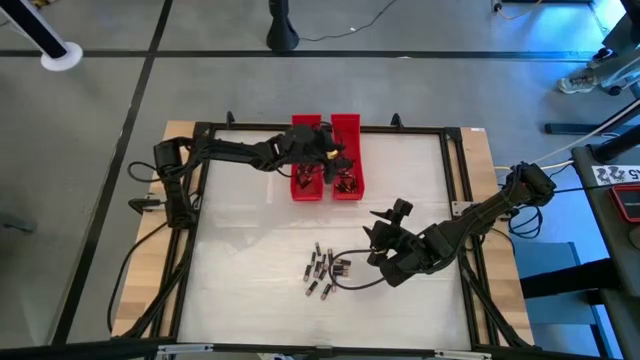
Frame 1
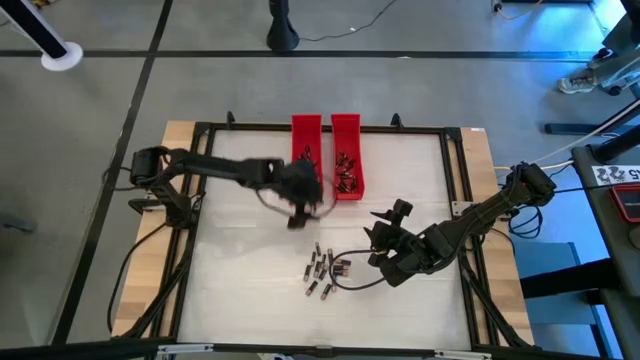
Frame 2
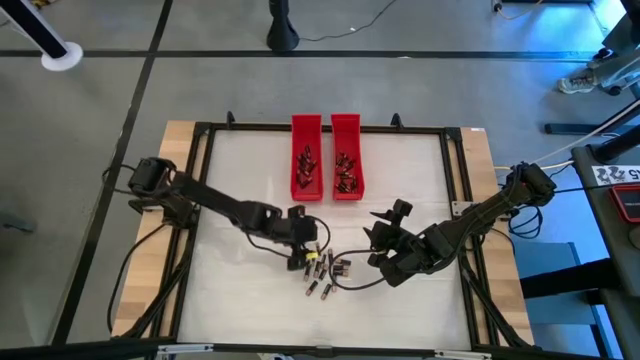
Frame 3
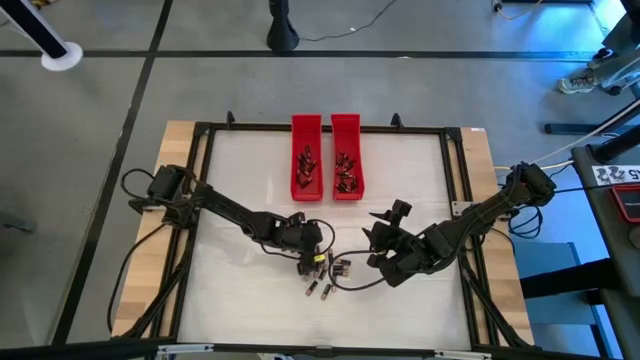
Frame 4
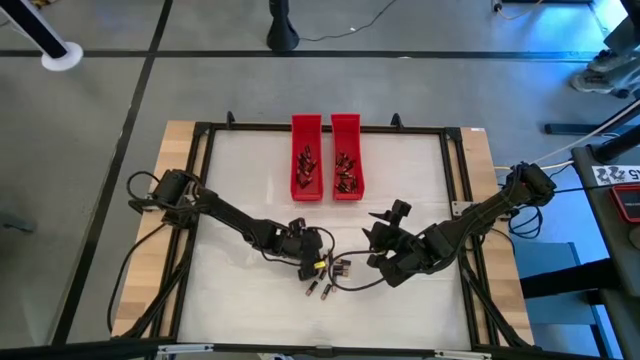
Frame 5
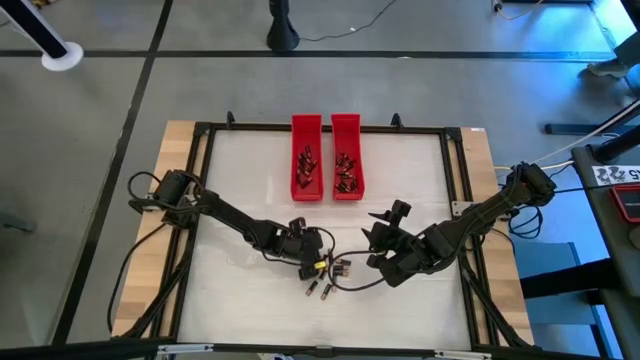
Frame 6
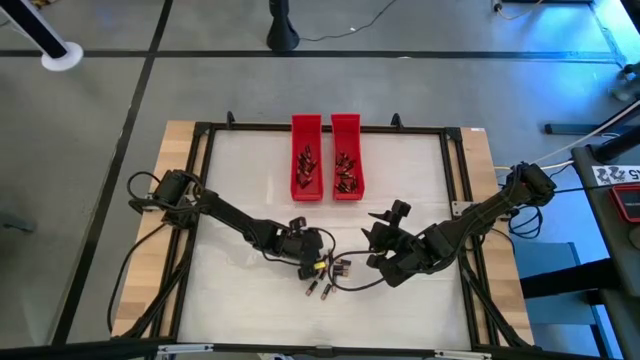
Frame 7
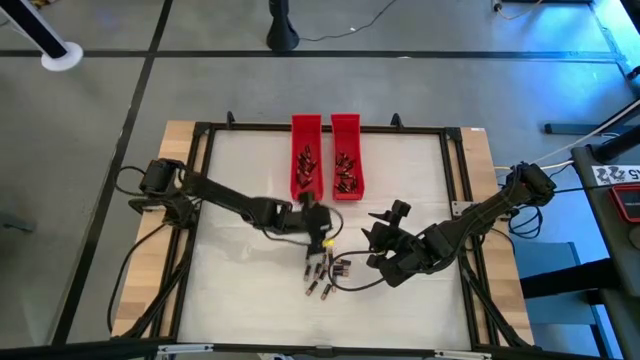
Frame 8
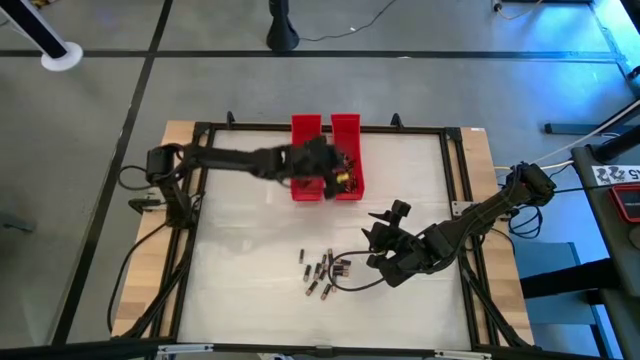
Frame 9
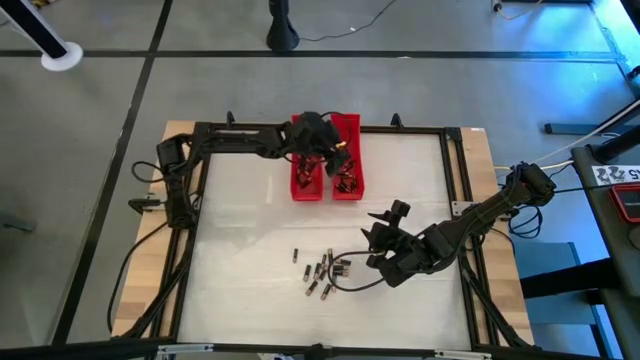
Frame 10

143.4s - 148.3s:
Task: Sort batteries
Put the small black battery into the right red bin

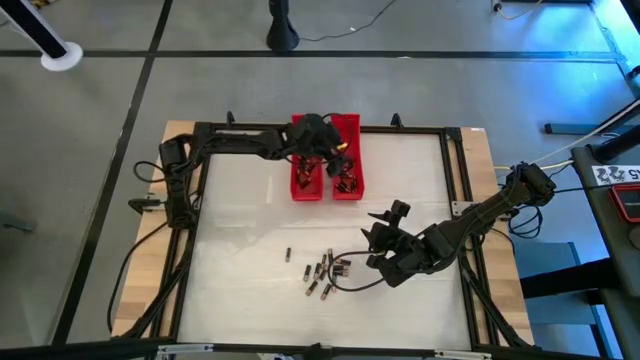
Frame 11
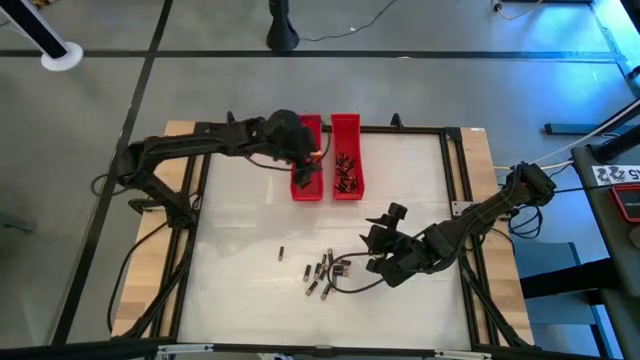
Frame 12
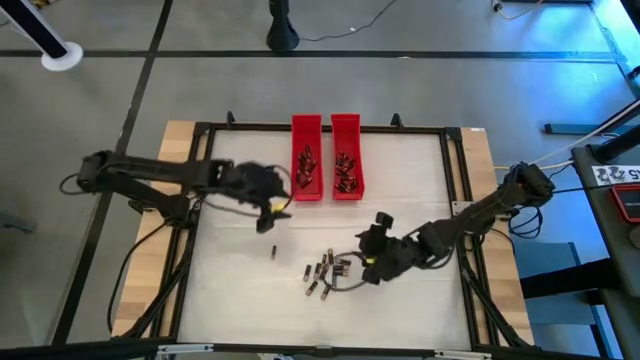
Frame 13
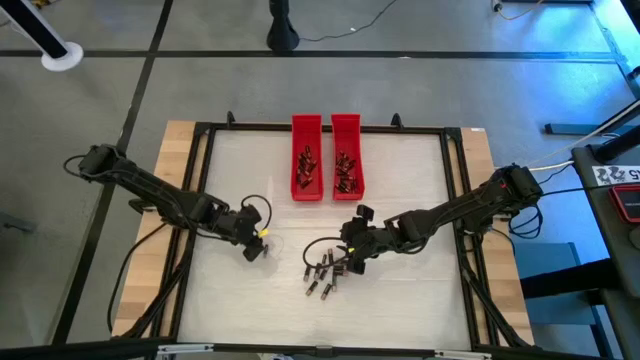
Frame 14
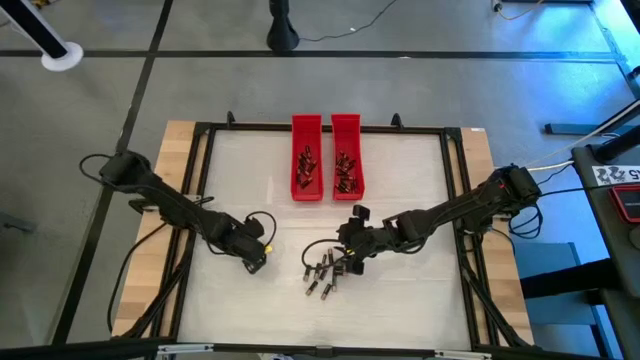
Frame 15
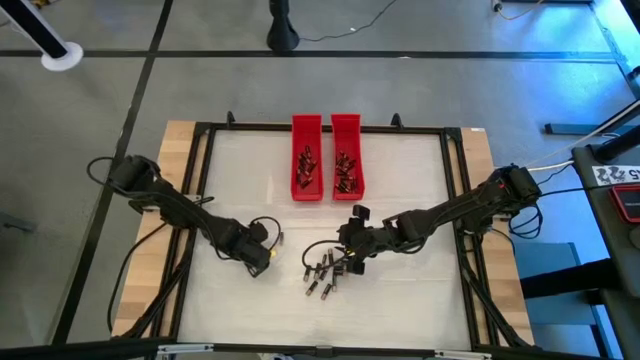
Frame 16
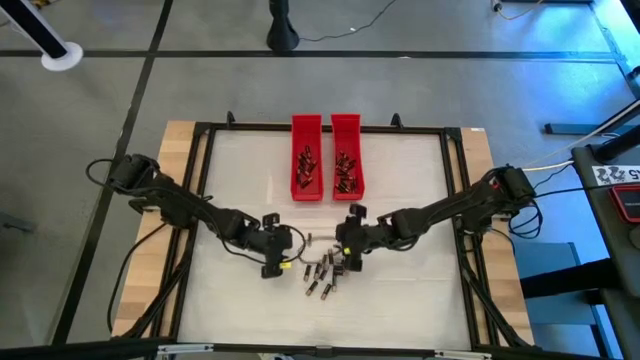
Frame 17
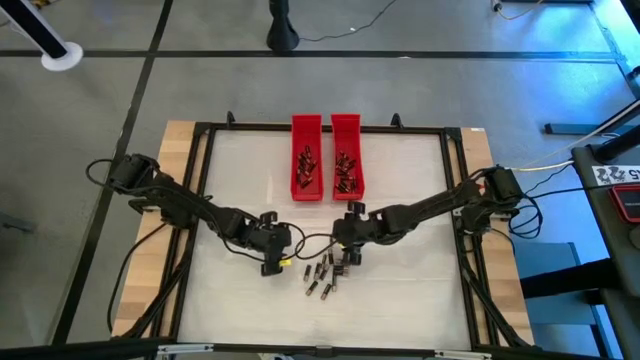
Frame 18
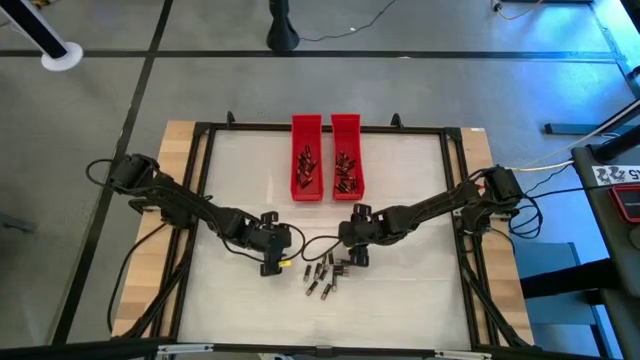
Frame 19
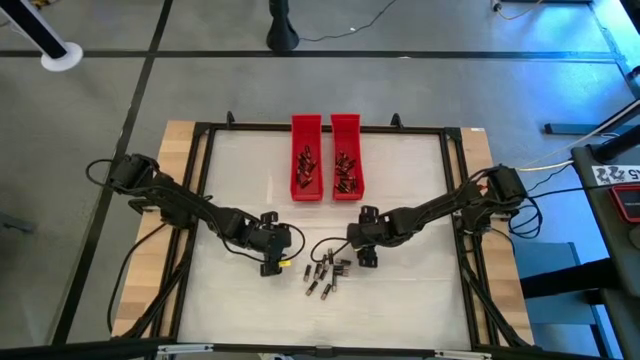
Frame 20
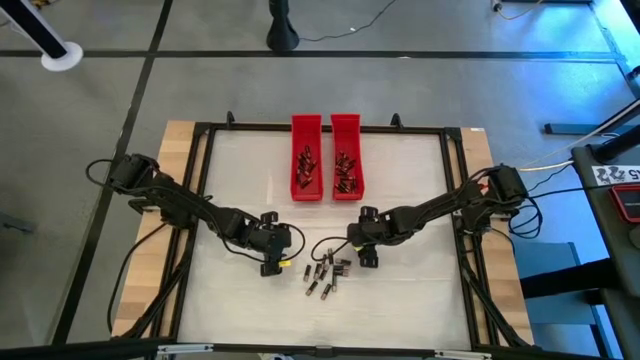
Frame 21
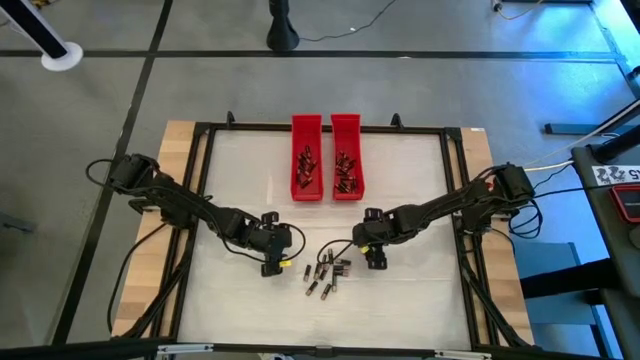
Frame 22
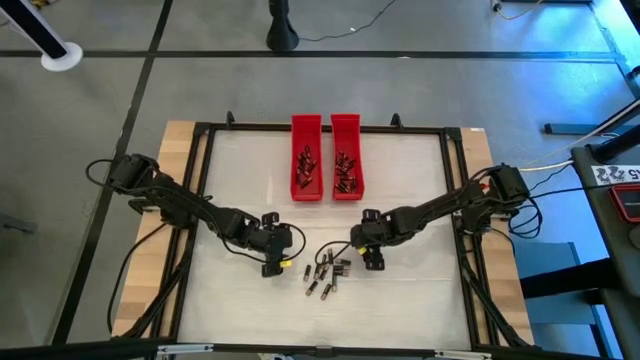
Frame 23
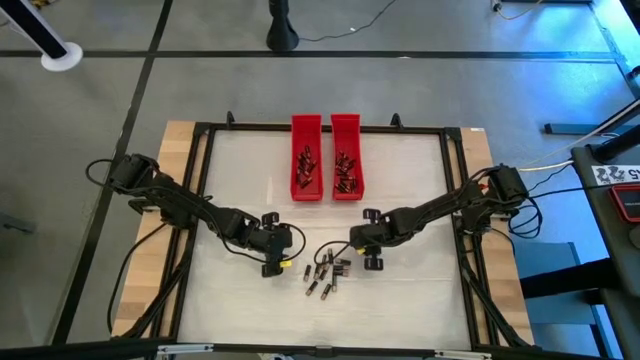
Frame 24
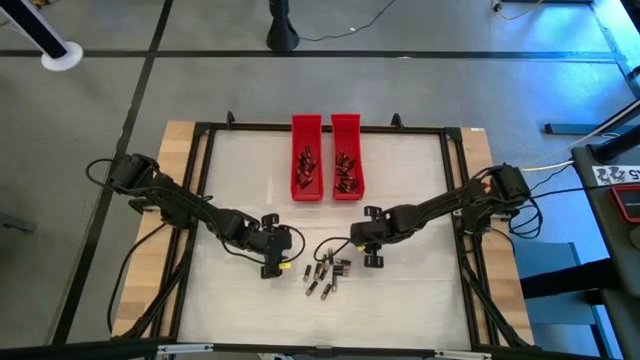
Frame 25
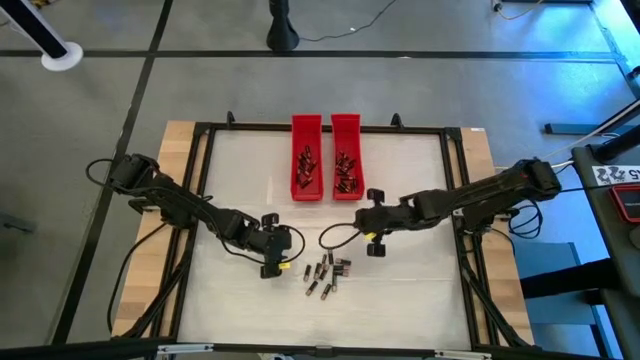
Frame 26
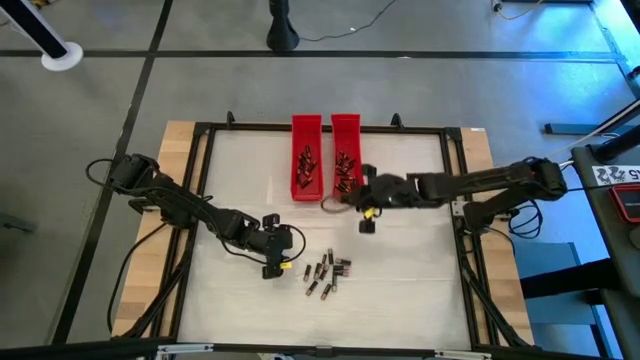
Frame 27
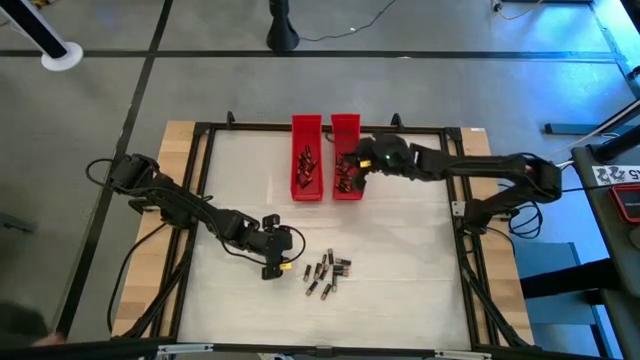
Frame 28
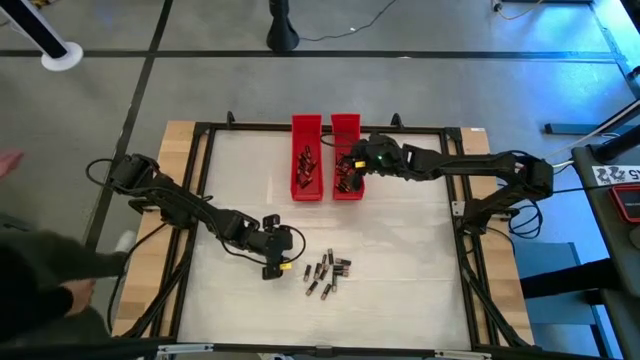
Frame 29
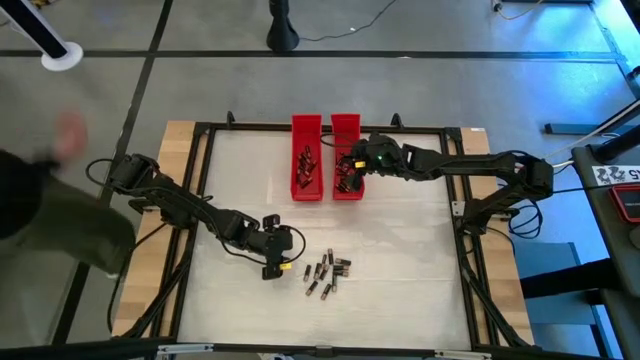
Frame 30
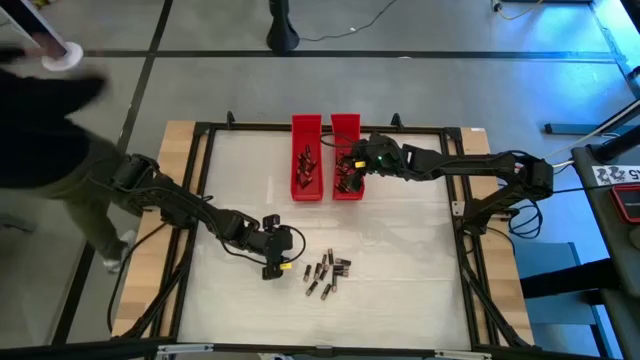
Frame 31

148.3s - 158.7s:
Put the small black battery into the right red bin

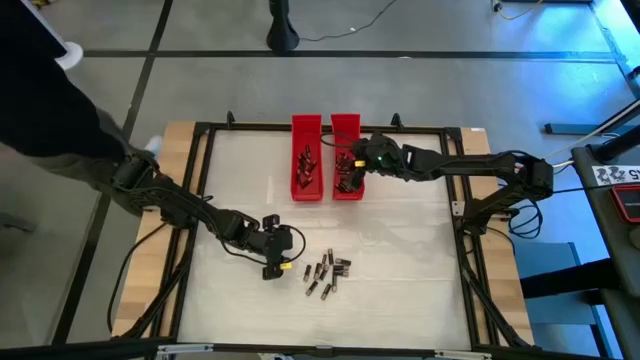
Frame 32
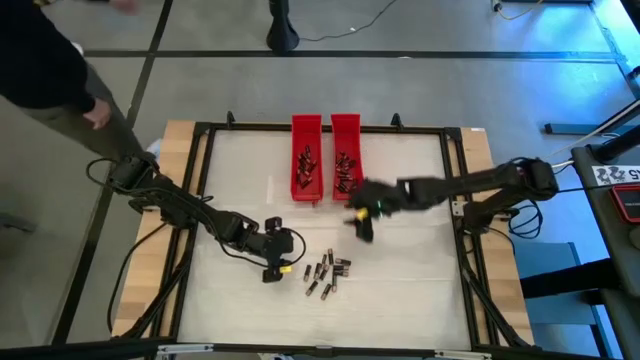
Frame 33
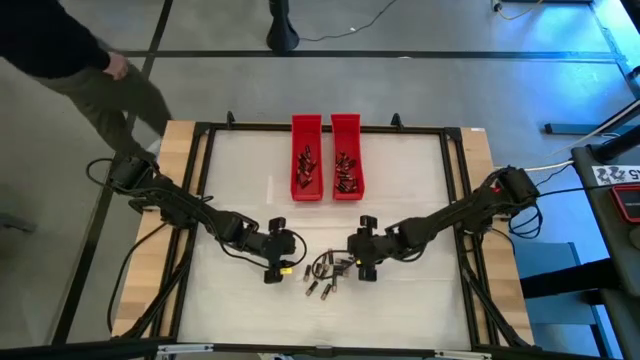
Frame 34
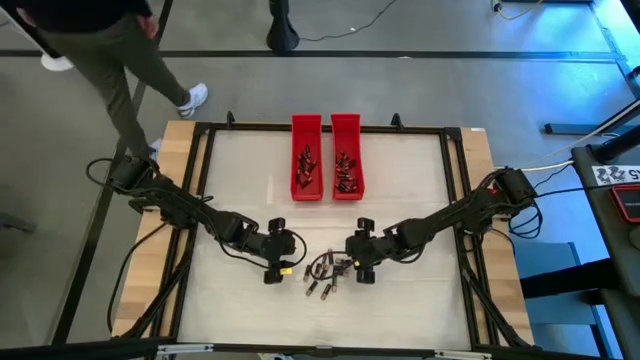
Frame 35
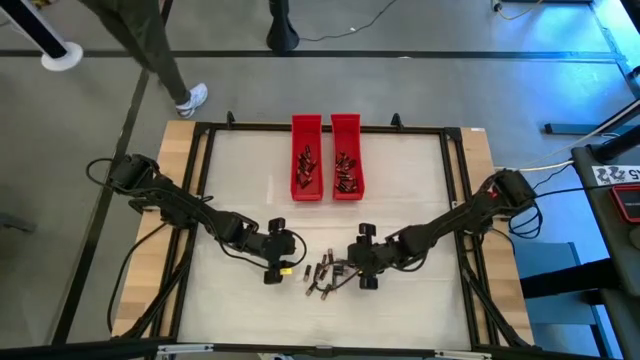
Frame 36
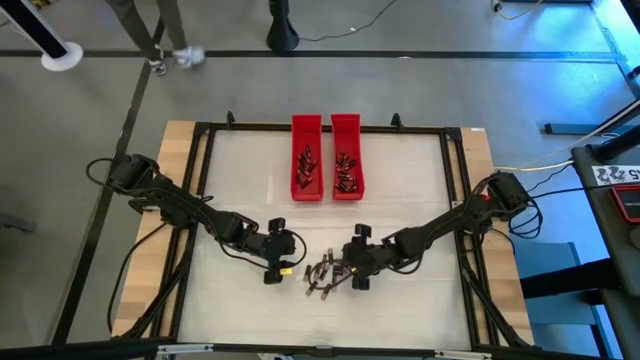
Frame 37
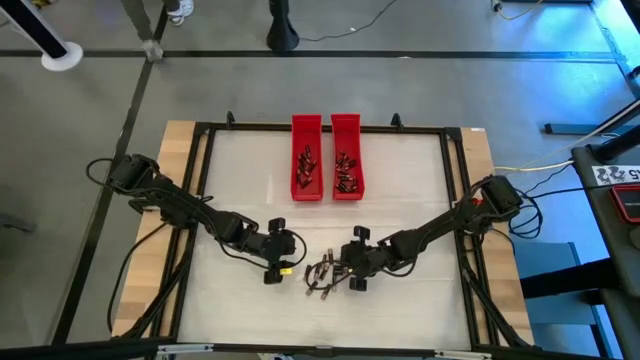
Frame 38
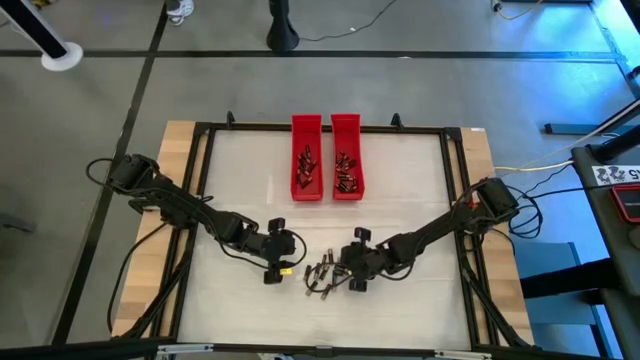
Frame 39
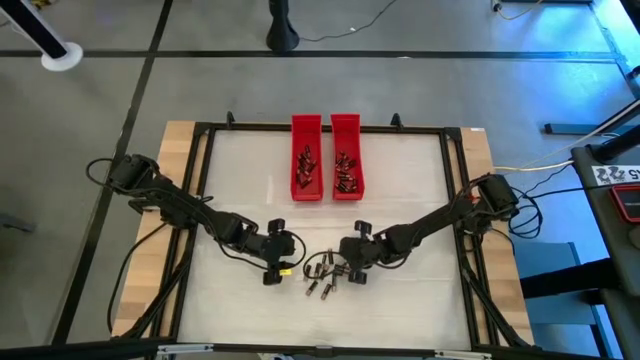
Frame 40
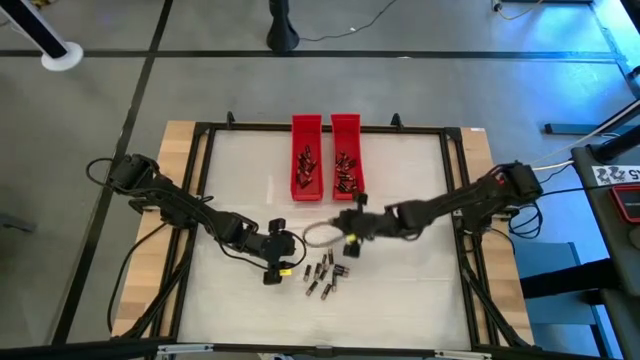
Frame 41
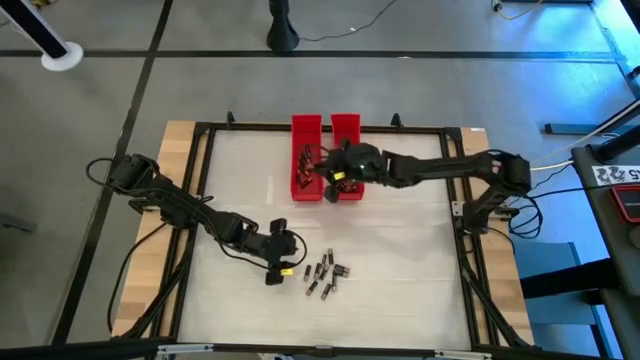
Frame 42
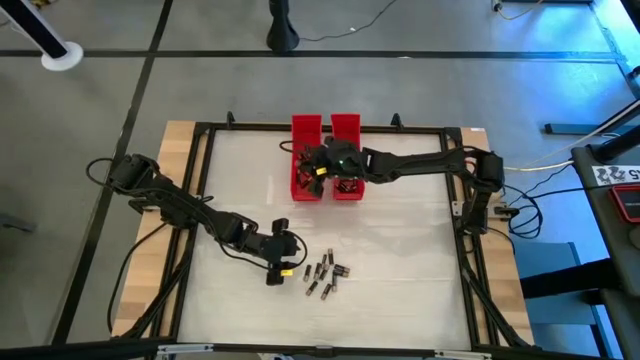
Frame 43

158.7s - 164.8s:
Put the large black battery into the left red bin
